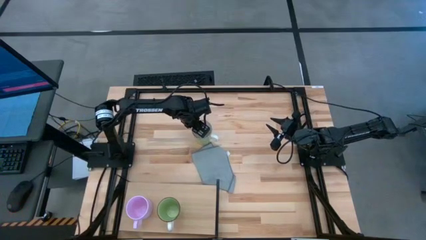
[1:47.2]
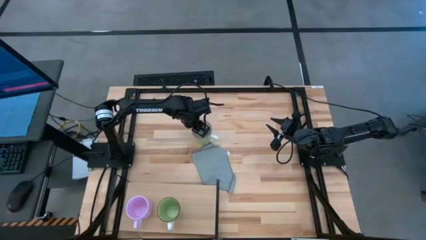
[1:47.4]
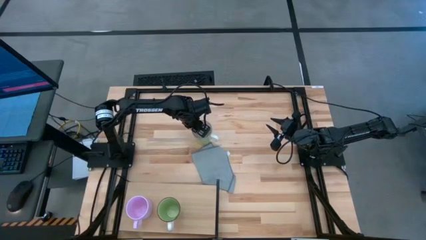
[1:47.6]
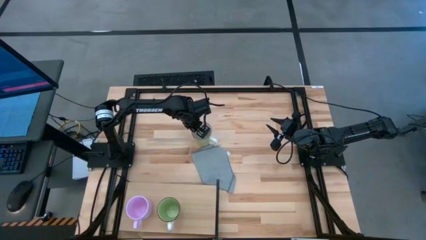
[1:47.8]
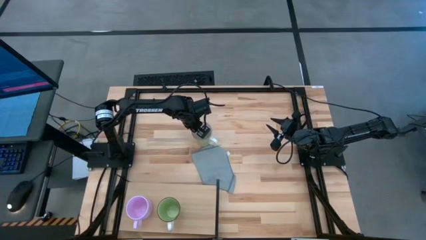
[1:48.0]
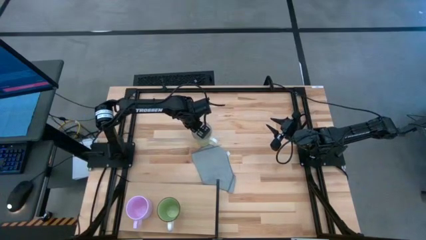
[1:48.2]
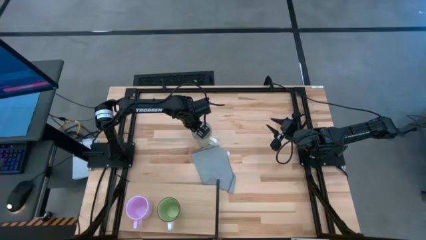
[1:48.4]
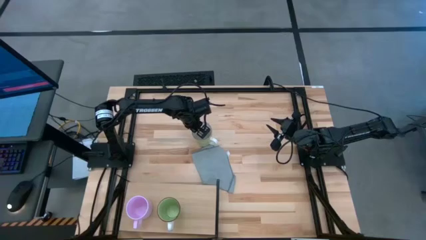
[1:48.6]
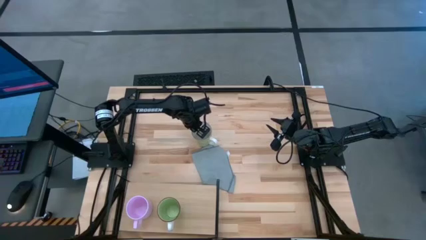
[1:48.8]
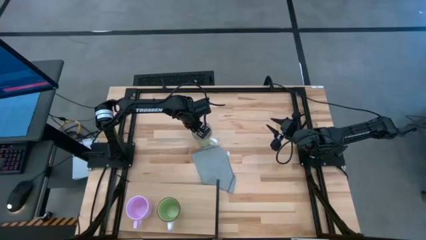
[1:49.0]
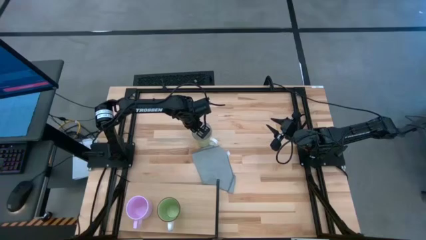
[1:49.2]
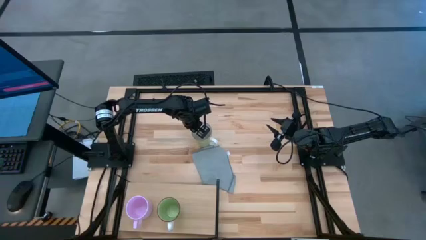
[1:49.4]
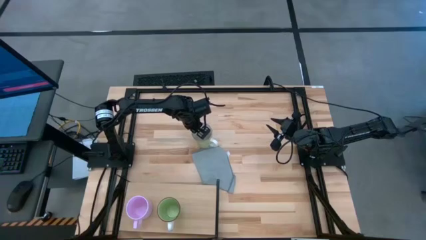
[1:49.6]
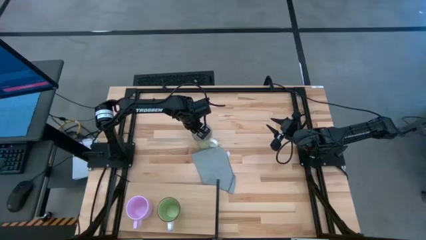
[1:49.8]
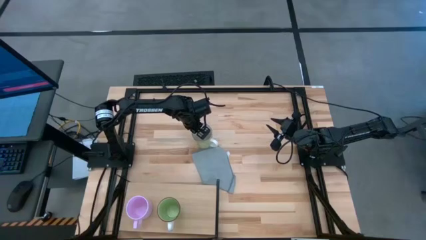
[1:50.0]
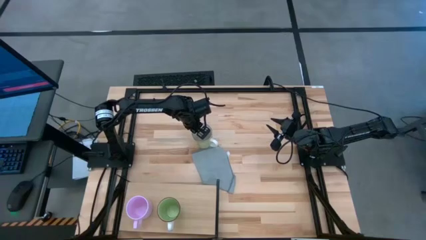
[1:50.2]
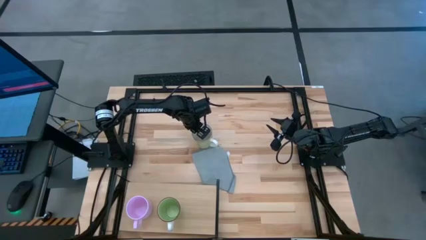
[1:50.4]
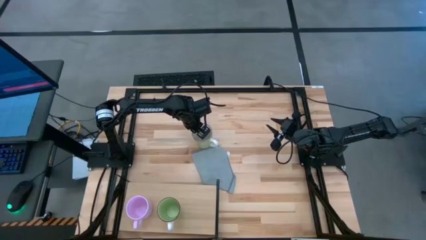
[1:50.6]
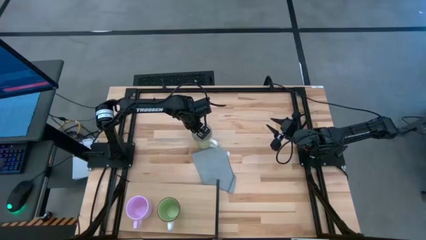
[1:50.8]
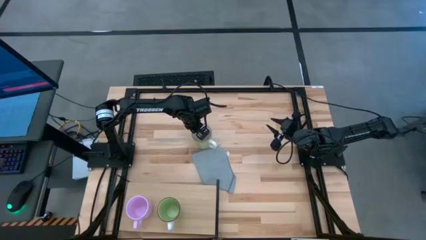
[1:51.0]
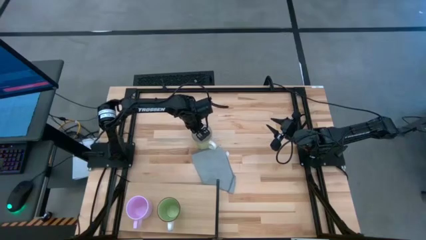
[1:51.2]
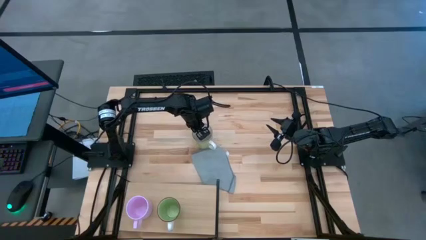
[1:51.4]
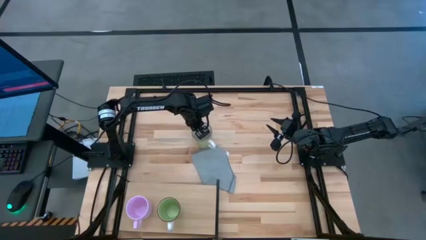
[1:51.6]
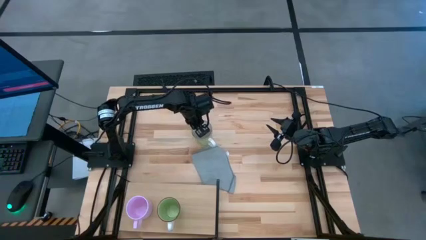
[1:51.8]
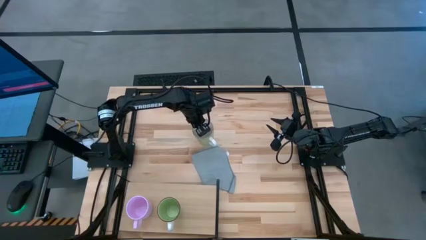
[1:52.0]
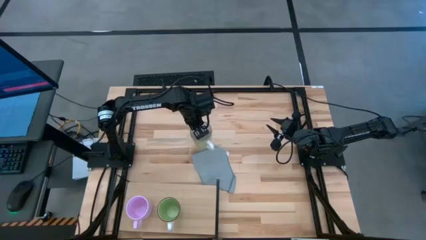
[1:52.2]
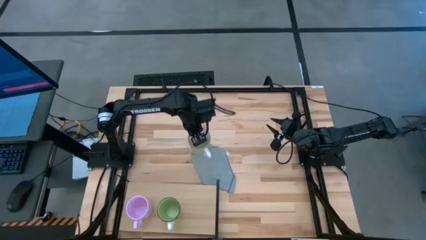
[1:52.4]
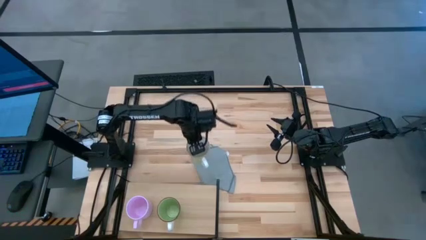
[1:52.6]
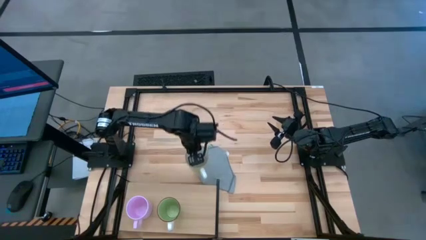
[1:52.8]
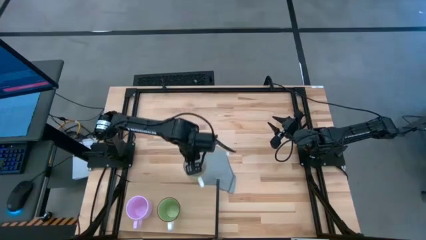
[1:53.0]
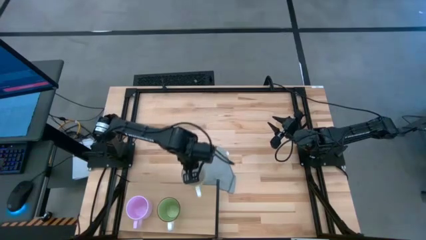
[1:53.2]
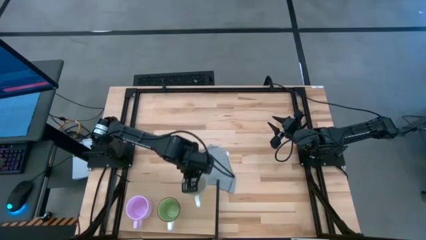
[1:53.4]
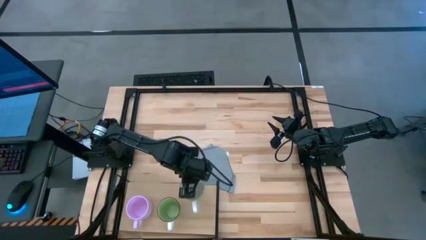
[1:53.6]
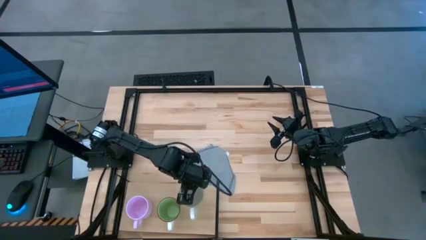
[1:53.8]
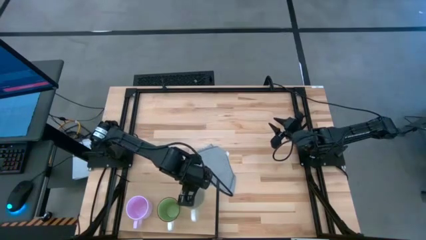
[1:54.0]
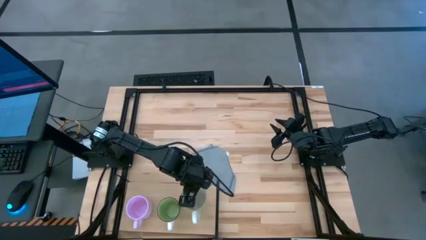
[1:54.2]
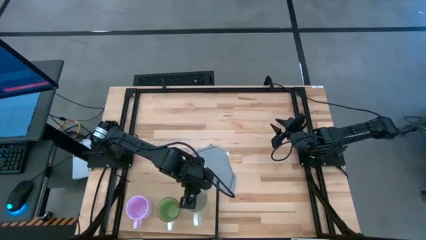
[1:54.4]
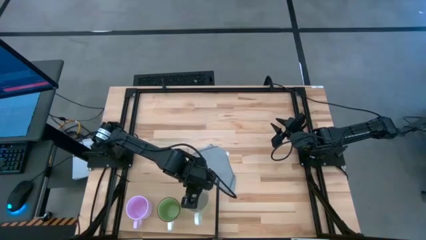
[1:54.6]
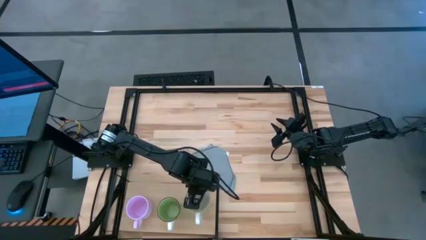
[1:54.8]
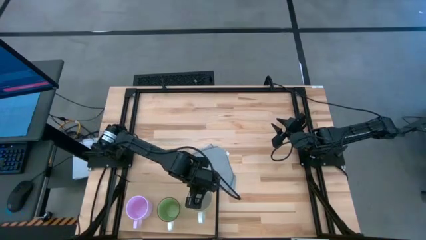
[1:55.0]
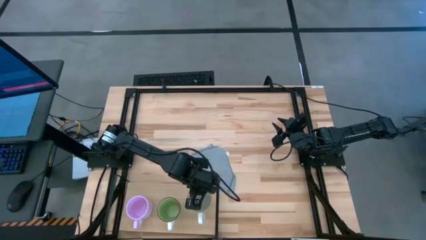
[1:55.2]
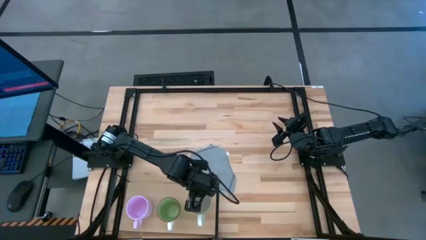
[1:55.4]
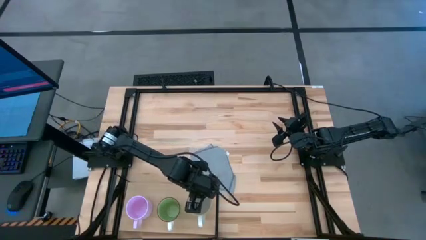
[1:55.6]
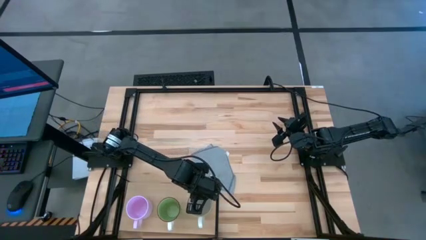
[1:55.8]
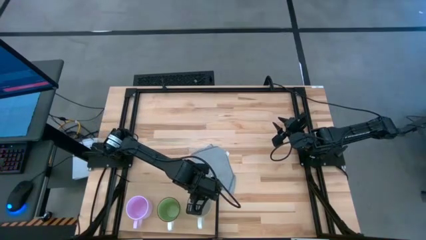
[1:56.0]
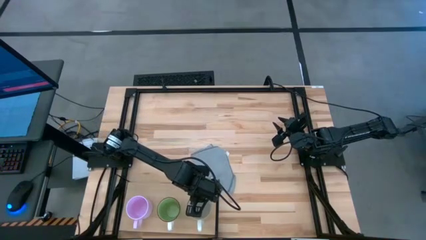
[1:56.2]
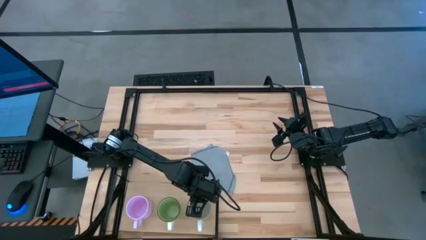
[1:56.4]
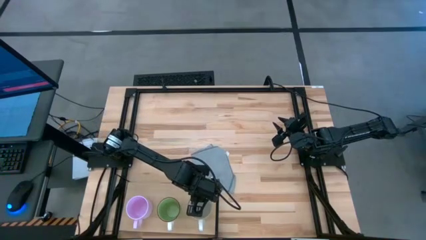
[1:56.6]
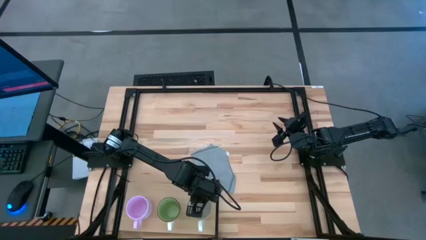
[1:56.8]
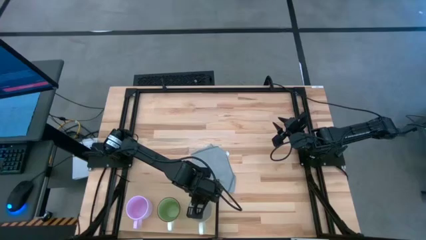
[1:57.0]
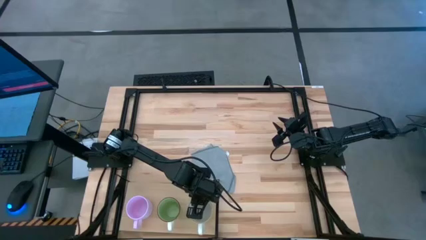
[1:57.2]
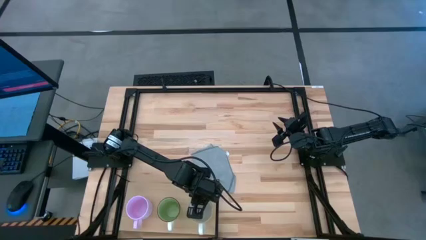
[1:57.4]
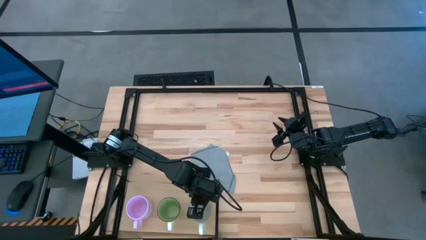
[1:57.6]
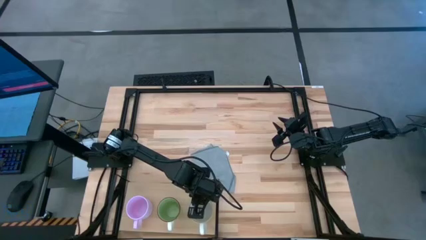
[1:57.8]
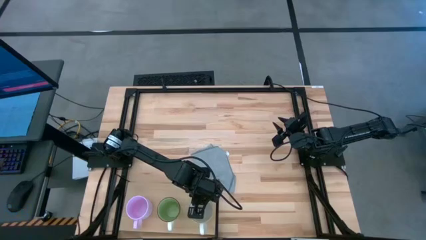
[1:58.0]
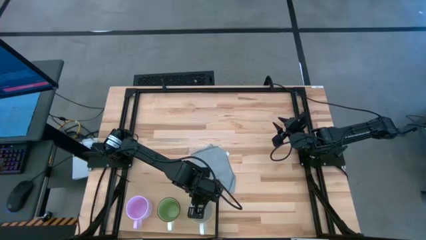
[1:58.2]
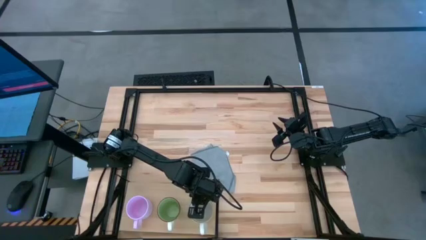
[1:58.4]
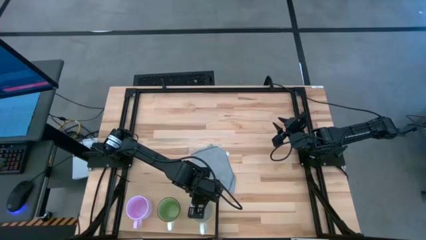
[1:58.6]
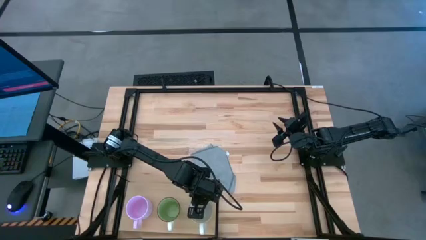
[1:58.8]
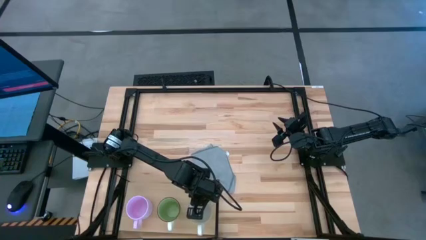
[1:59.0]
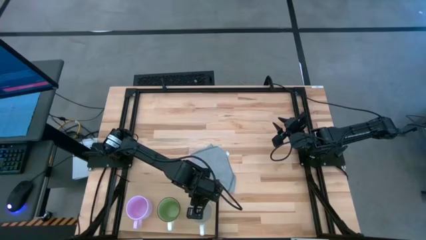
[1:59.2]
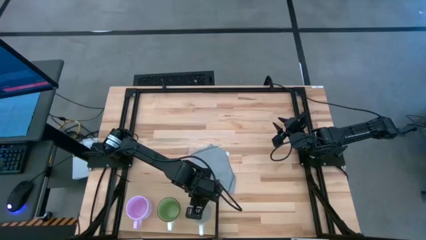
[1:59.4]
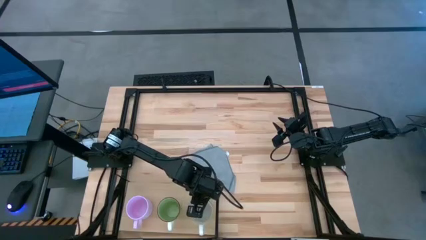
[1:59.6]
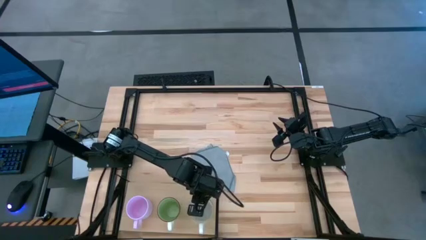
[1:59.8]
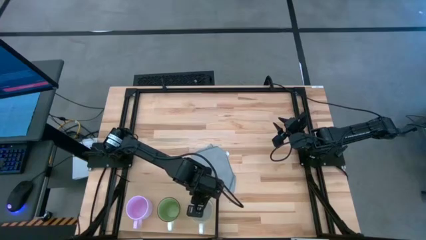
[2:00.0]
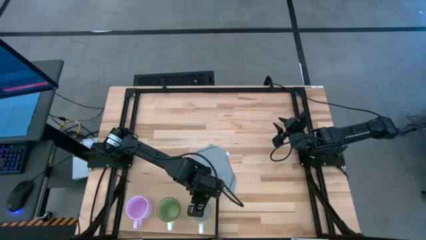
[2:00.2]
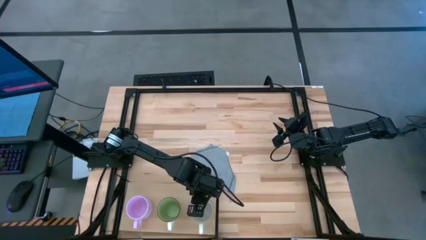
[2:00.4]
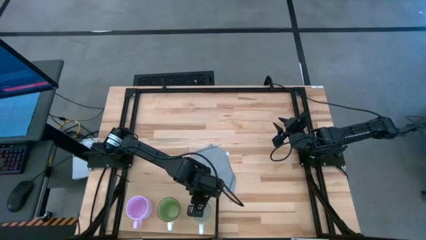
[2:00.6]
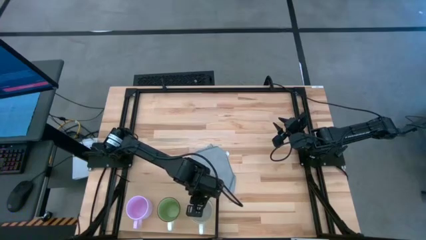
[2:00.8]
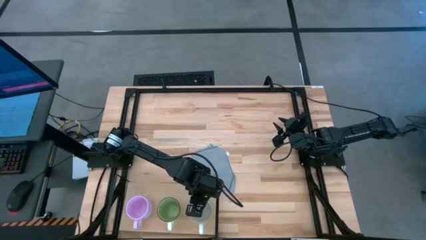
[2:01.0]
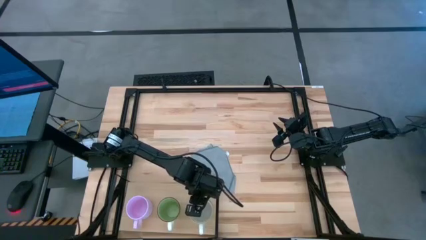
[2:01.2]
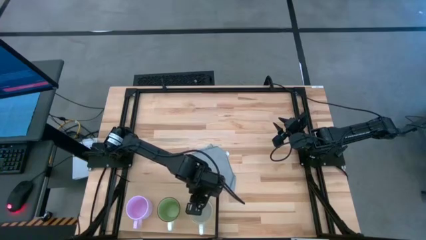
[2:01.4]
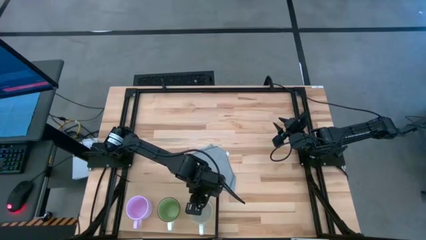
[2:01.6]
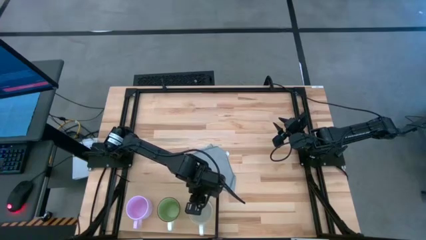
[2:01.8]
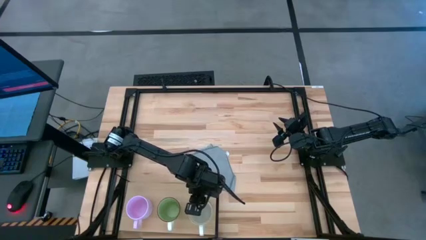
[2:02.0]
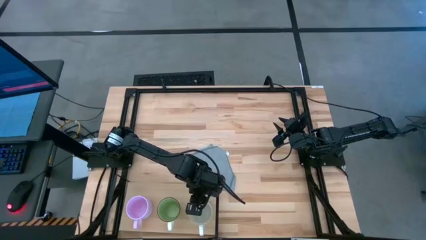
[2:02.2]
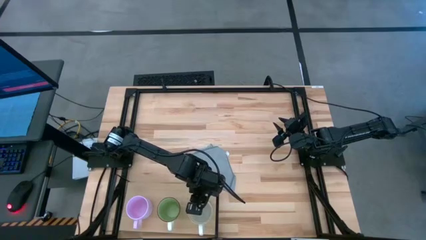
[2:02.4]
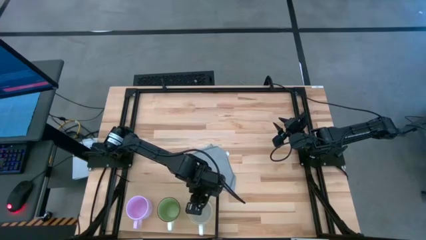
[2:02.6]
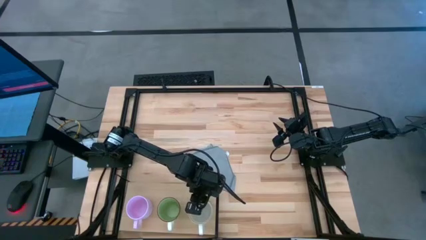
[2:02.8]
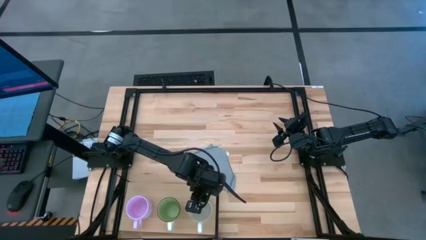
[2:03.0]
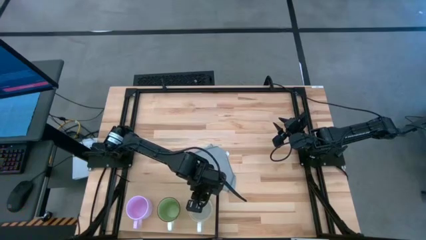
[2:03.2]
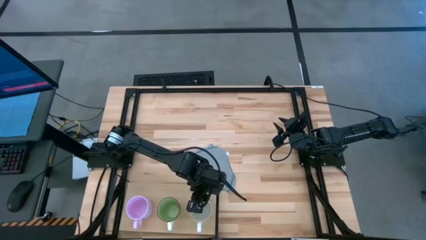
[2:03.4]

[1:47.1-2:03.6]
Task: Stack small to large cups/mugs on shelf
Put the white mug onto the shelf
